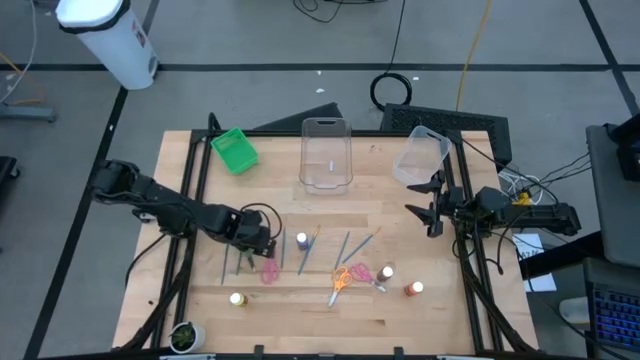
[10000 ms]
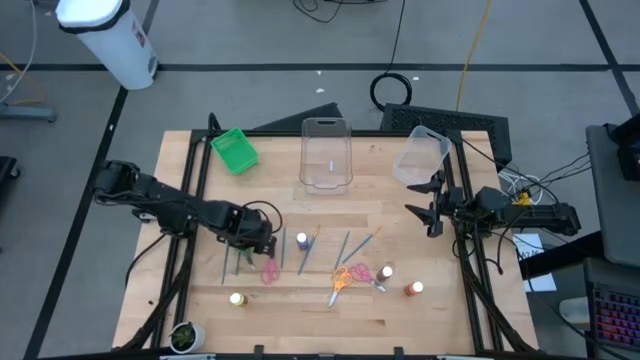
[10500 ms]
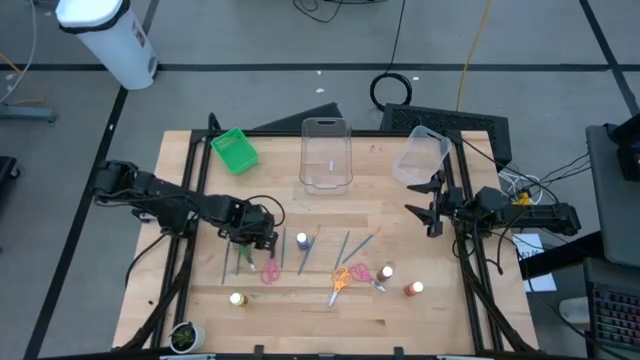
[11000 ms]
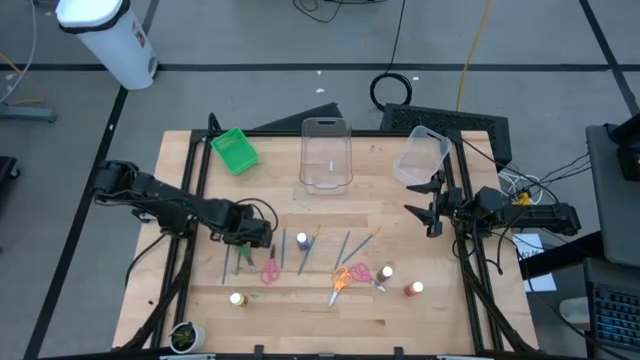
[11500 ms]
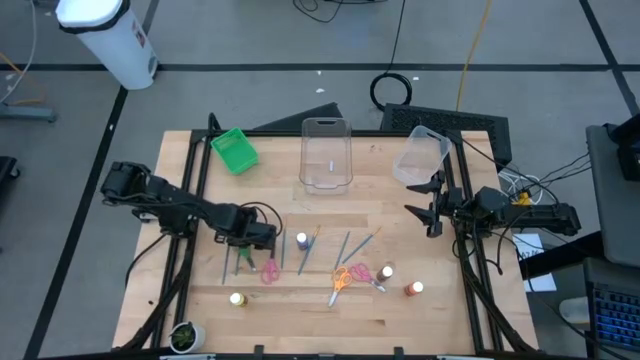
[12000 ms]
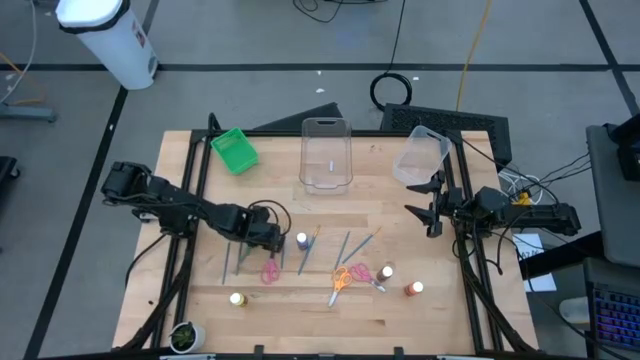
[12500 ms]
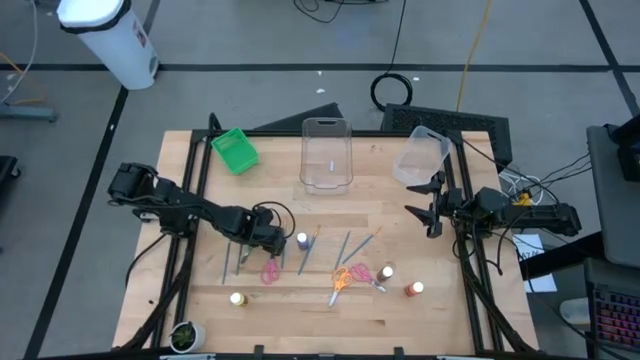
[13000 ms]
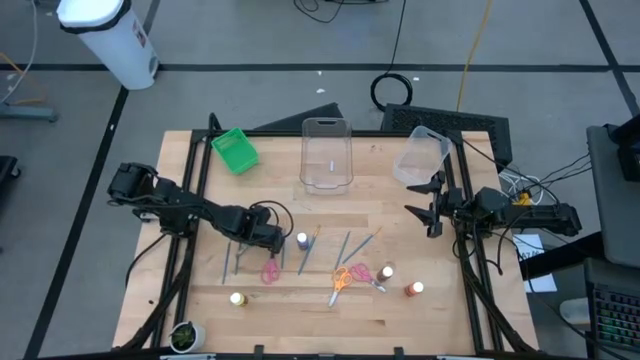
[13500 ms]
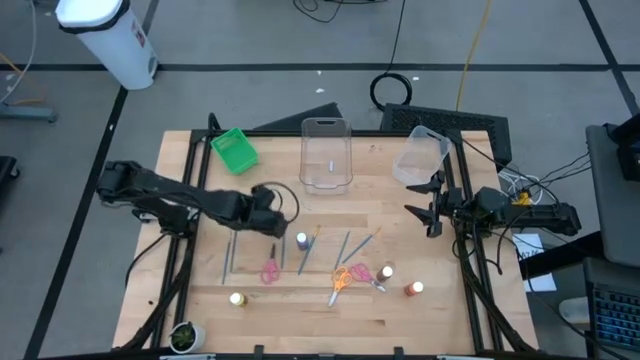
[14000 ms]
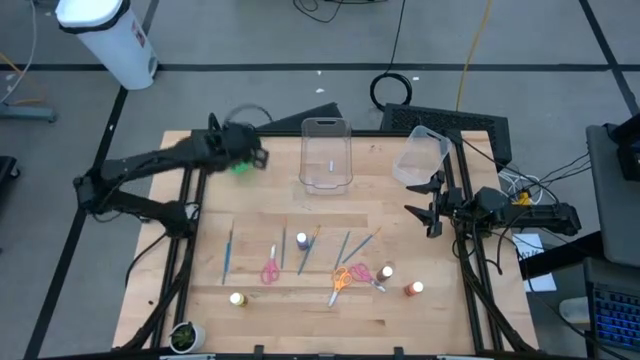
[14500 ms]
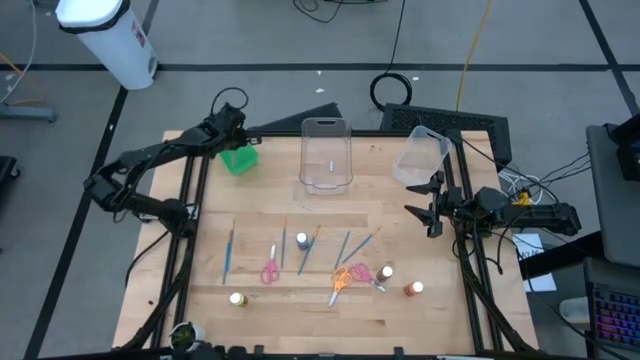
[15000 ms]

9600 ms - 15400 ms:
Task: Pick & Place Paint Supplies
Put the green scissor into the green bin

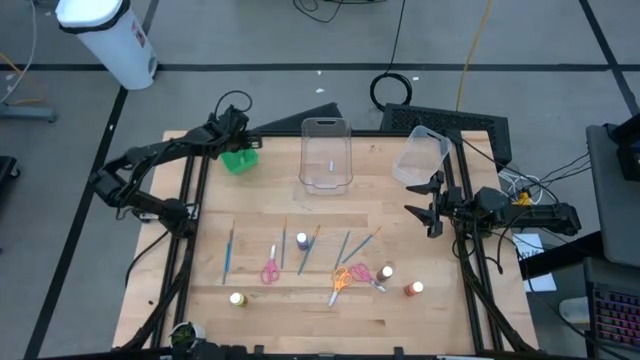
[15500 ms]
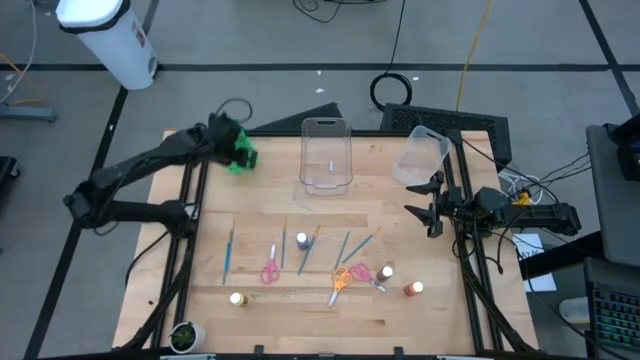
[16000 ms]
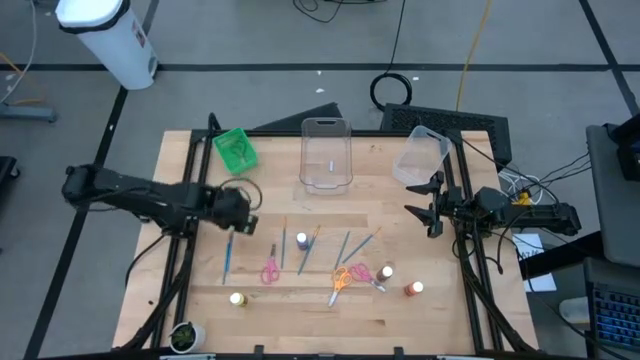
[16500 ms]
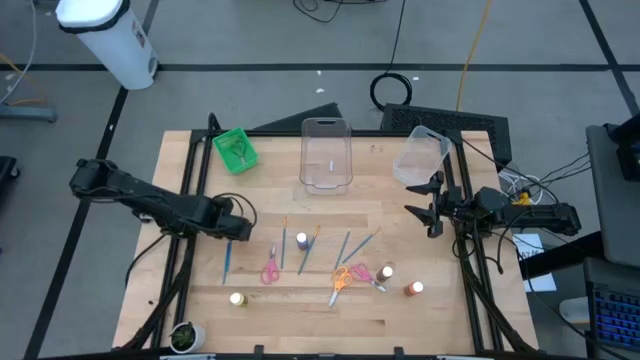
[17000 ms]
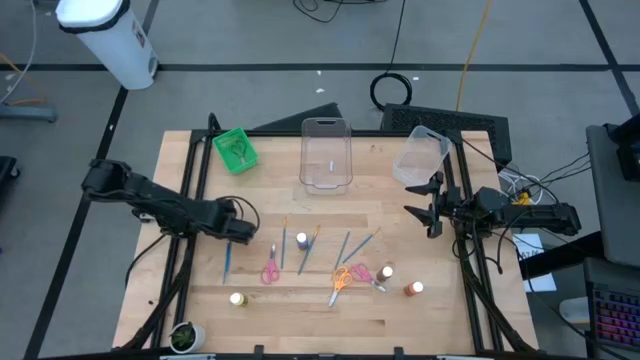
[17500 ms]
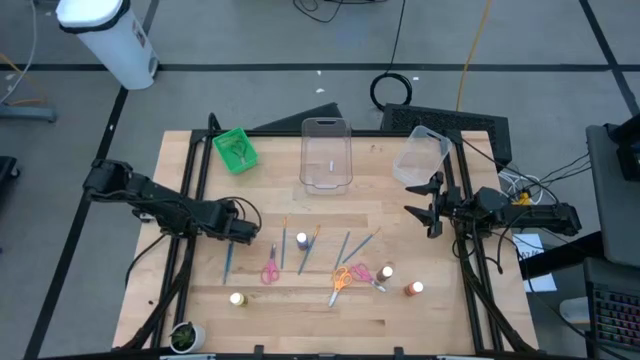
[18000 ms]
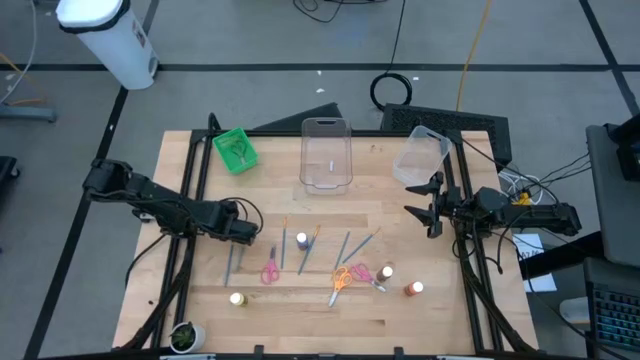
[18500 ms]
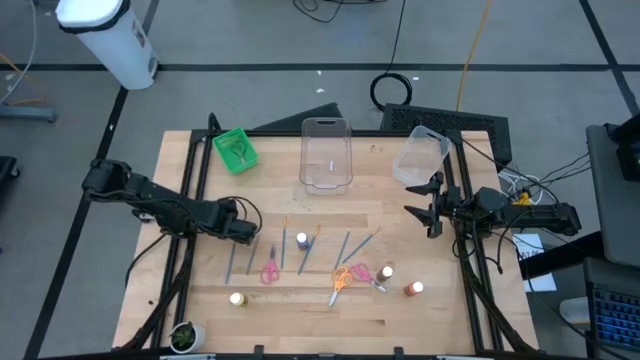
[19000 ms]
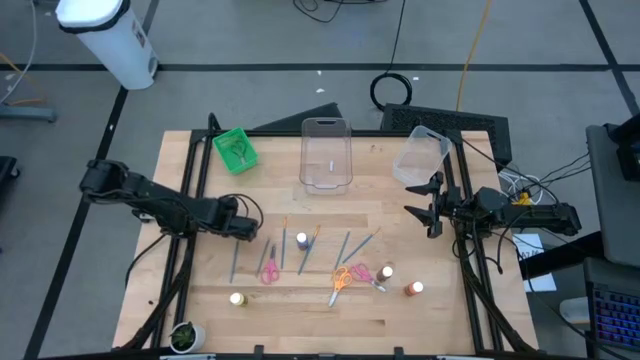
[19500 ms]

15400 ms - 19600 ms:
Put the blue paint brush into the white bin

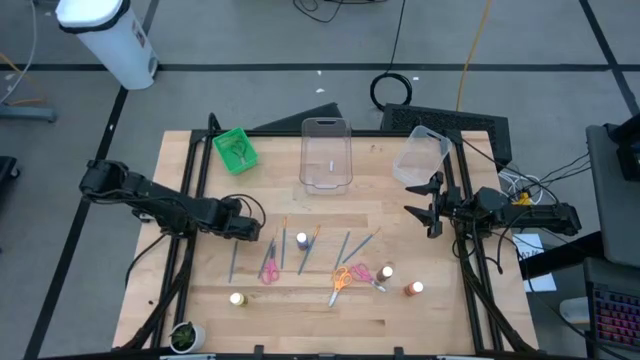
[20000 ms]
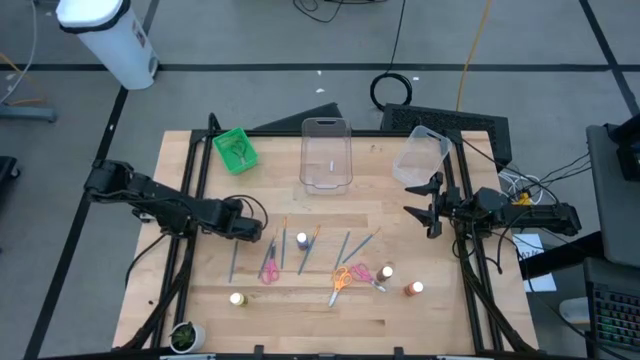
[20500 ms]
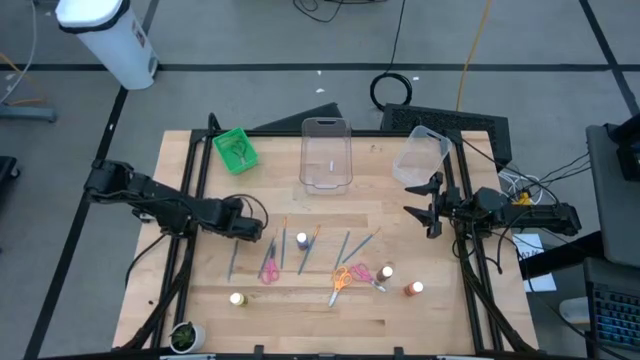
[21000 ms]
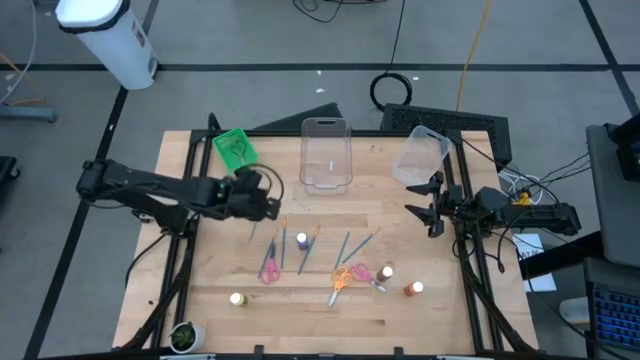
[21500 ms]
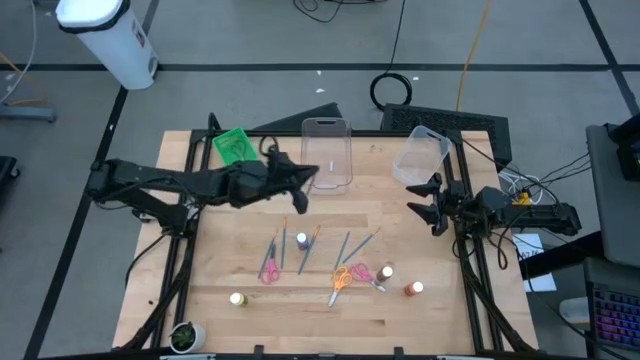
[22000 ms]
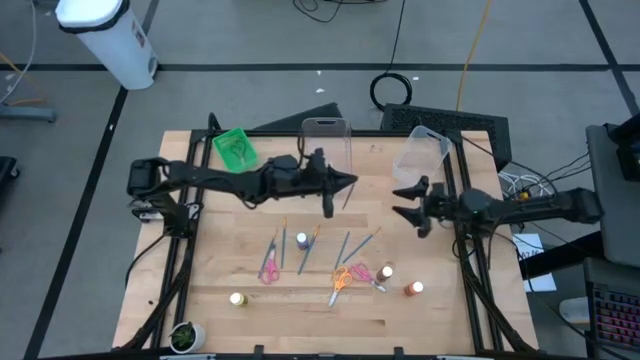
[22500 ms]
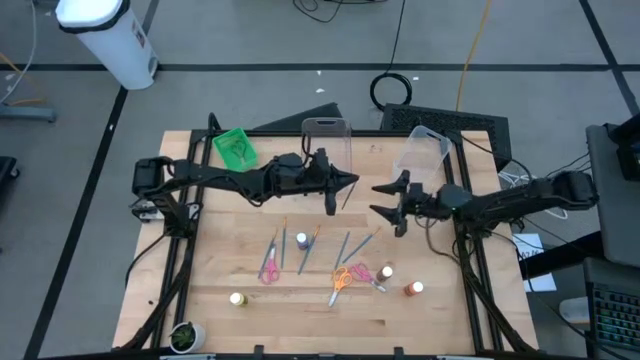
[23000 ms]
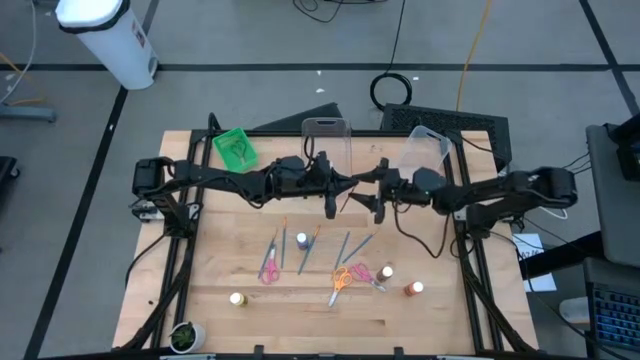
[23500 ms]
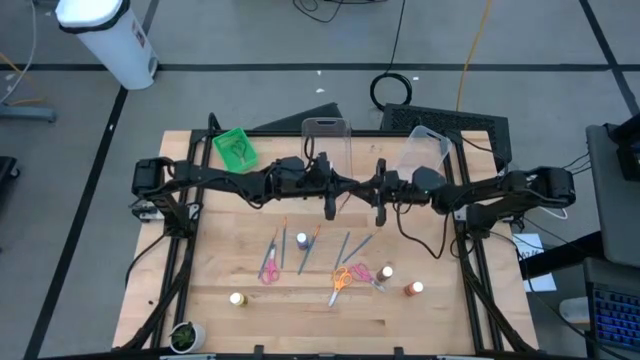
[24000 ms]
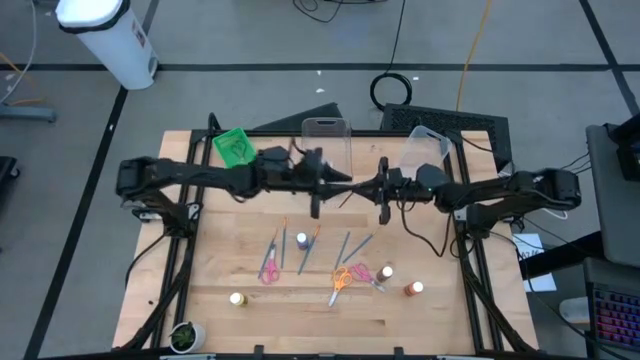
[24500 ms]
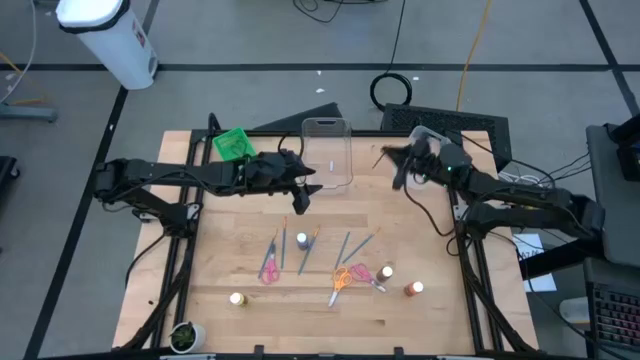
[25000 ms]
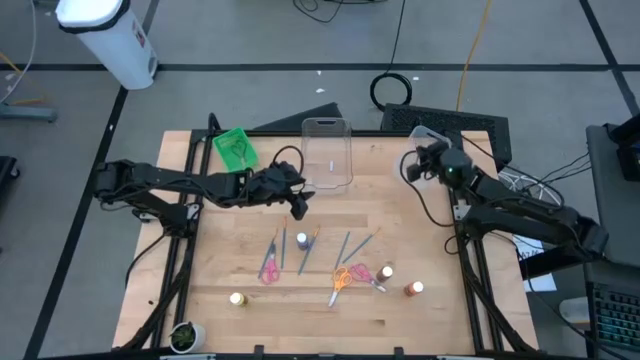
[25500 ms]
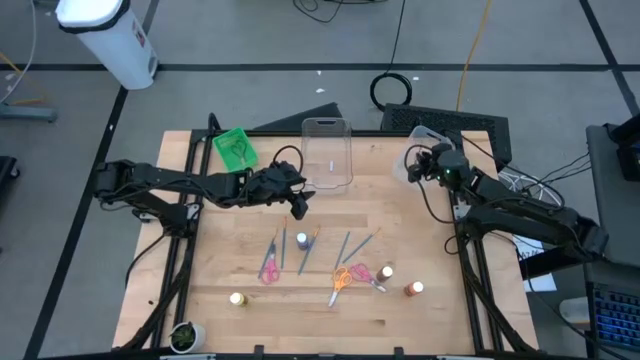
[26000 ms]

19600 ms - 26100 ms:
Put the blue paint brush into the white bin

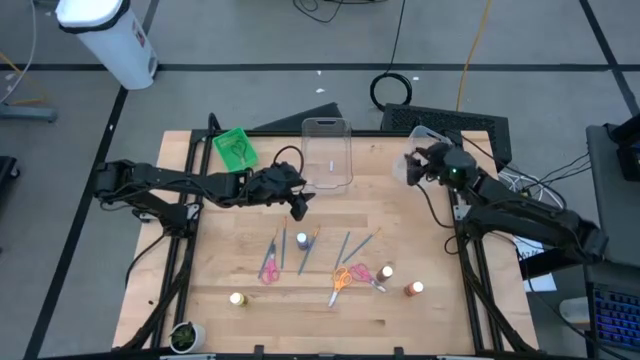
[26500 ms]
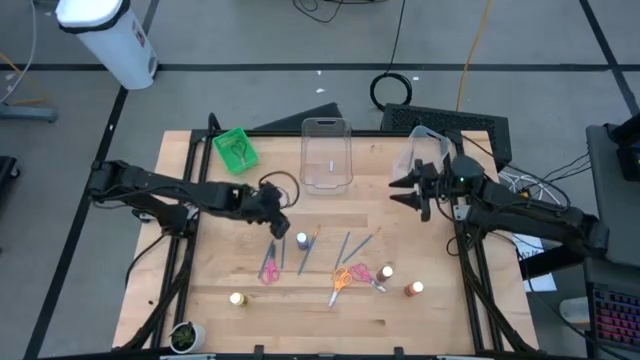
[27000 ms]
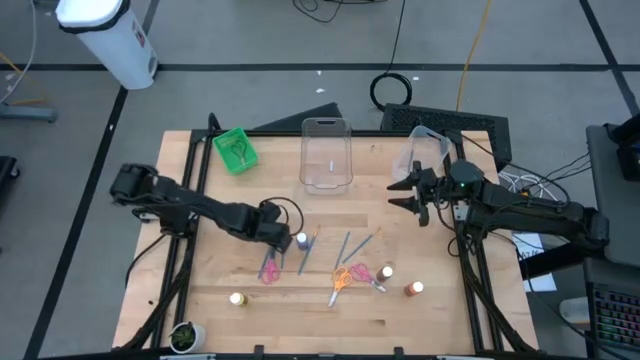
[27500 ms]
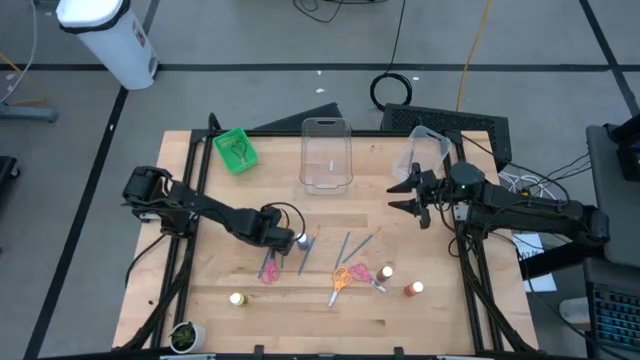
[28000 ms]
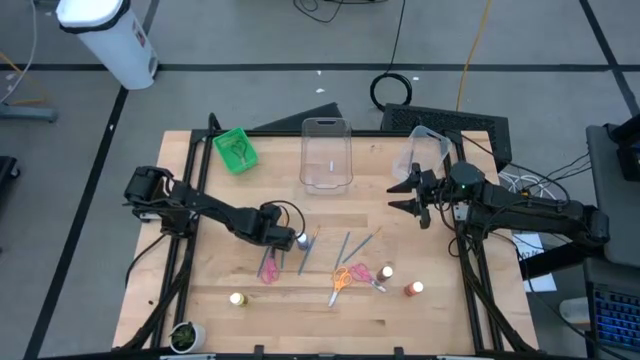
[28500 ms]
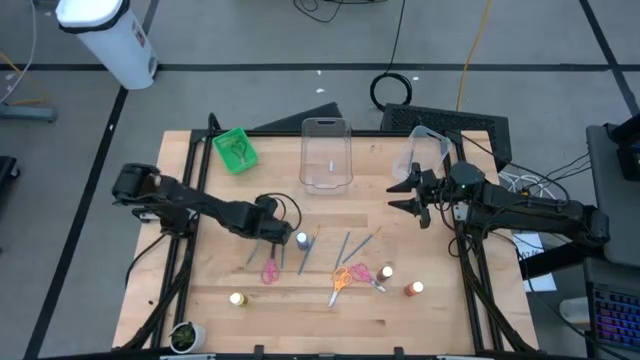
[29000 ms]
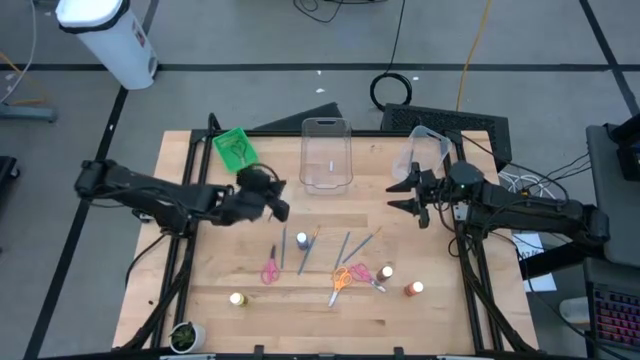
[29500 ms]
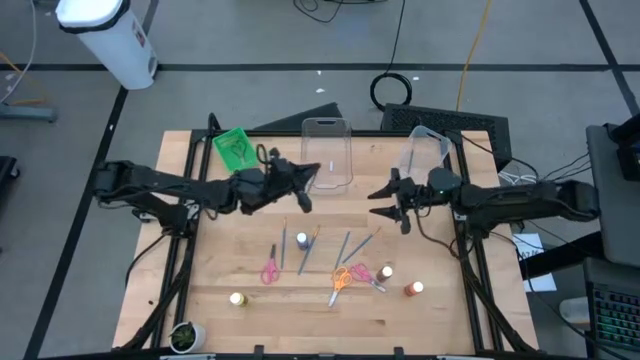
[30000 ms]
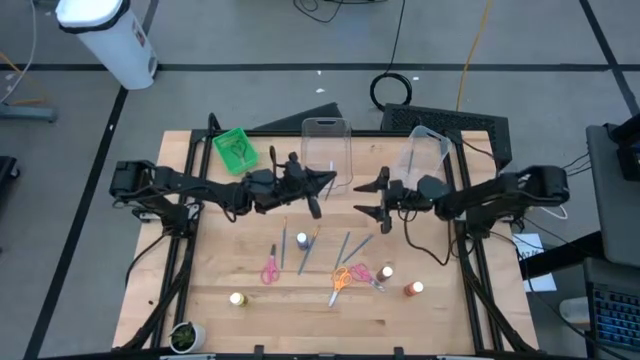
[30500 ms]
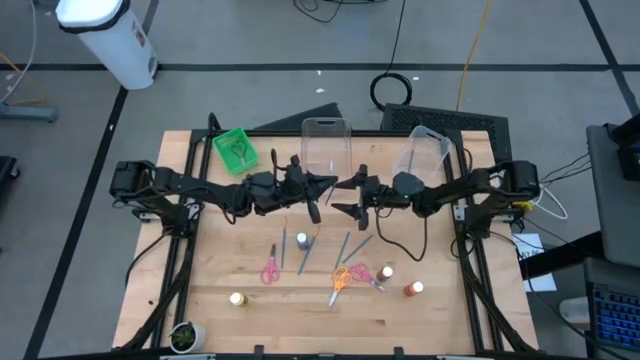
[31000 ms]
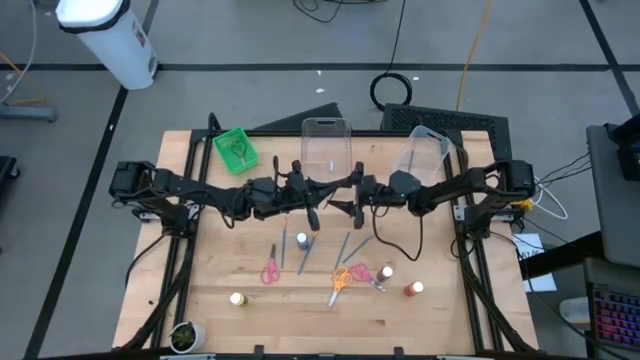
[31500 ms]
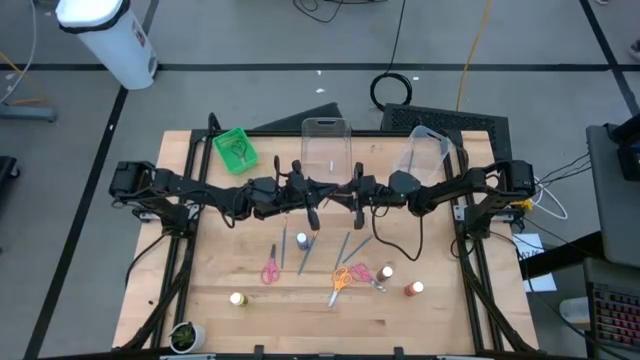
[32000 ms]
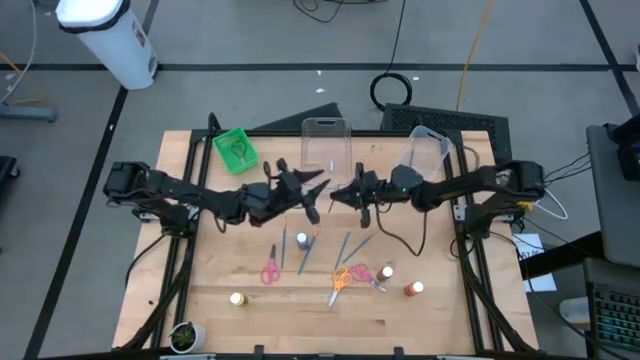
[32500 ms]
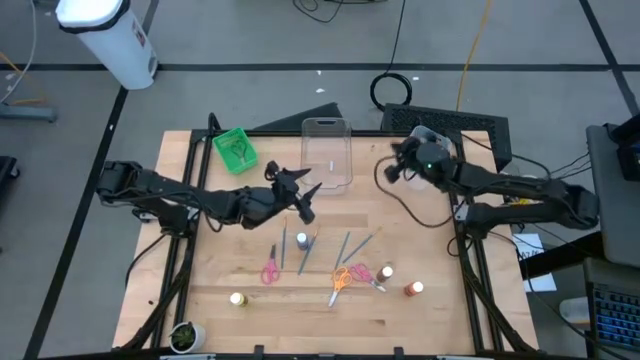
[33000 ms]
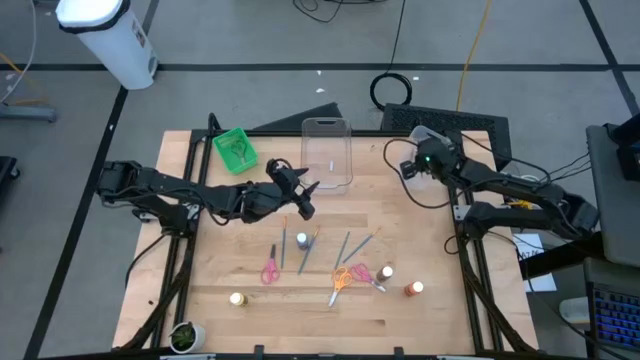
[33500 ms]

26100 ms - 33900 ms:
Put the blue paint brush into the white bin
